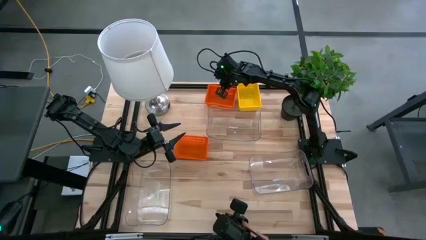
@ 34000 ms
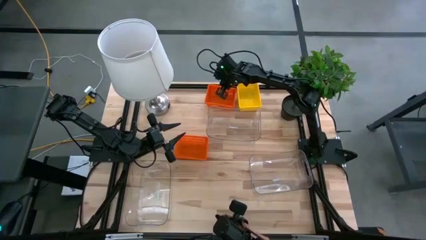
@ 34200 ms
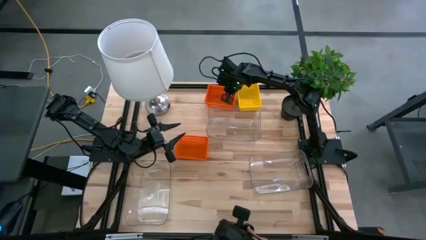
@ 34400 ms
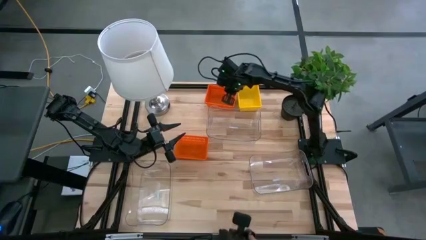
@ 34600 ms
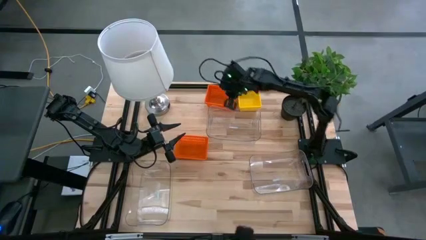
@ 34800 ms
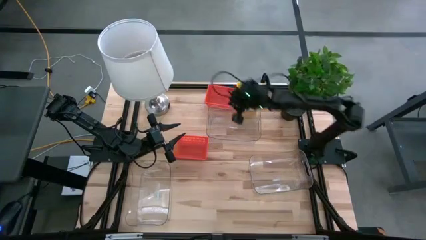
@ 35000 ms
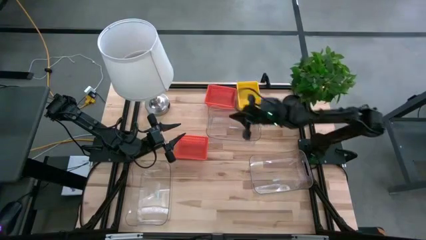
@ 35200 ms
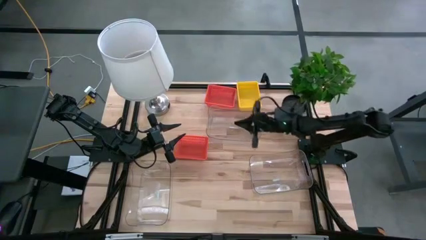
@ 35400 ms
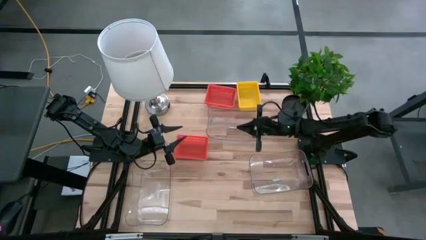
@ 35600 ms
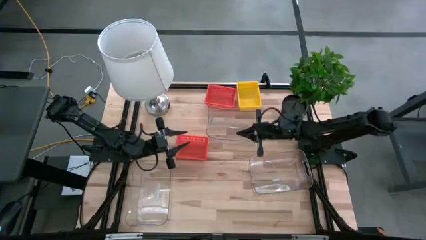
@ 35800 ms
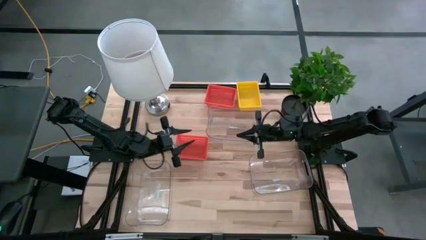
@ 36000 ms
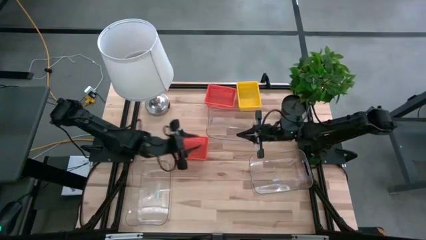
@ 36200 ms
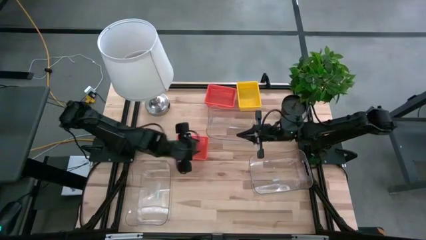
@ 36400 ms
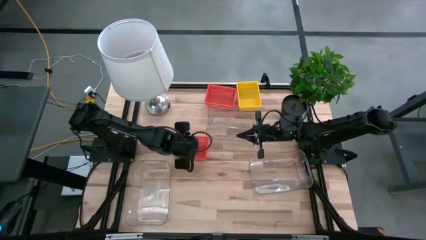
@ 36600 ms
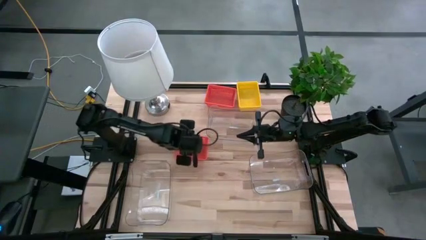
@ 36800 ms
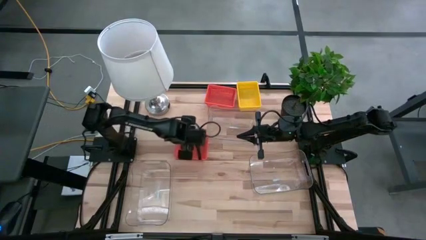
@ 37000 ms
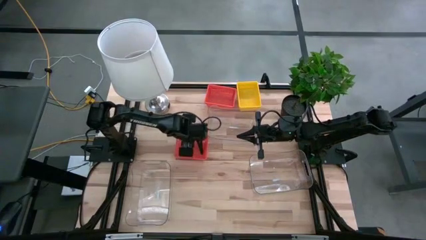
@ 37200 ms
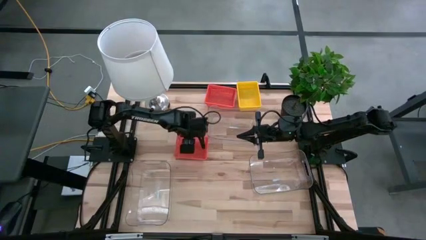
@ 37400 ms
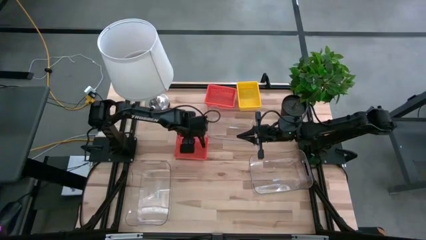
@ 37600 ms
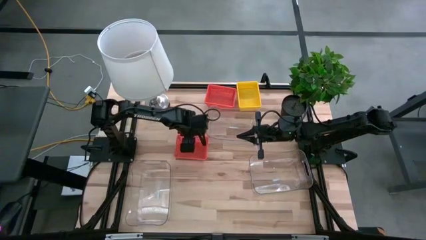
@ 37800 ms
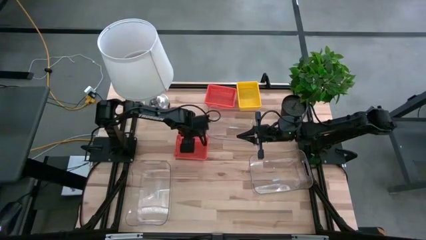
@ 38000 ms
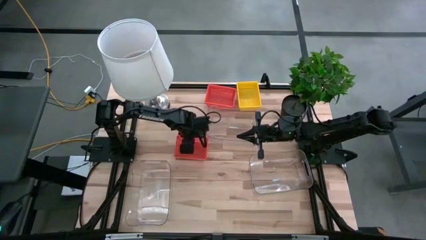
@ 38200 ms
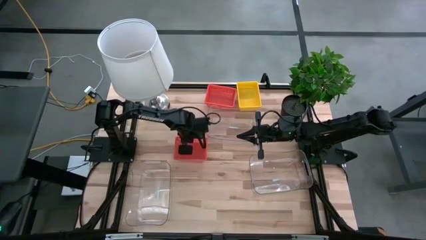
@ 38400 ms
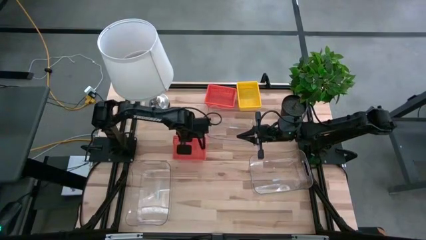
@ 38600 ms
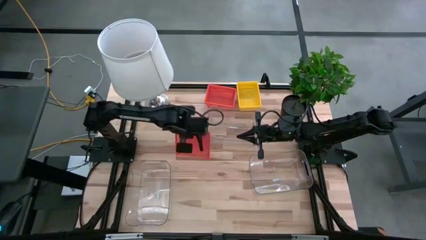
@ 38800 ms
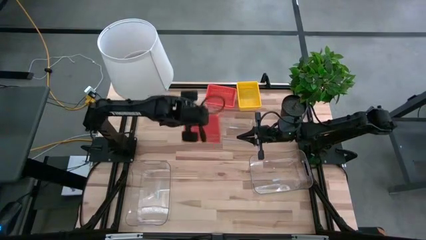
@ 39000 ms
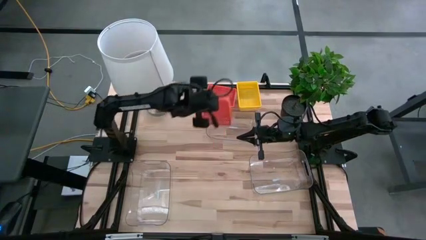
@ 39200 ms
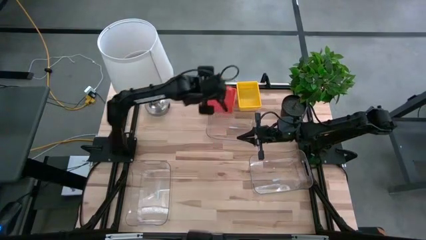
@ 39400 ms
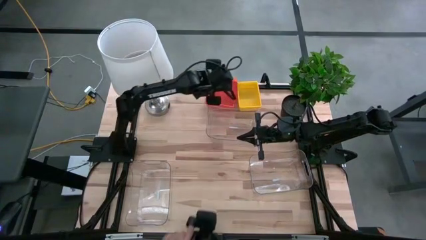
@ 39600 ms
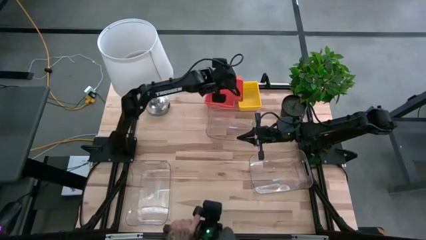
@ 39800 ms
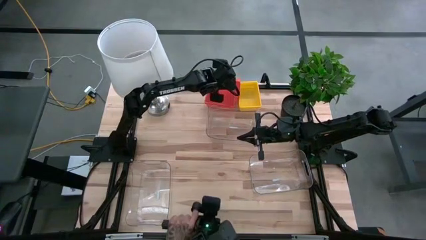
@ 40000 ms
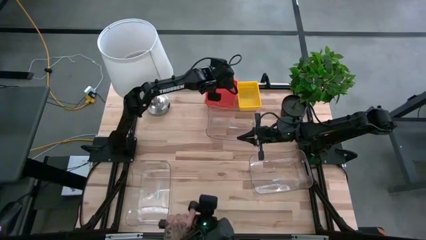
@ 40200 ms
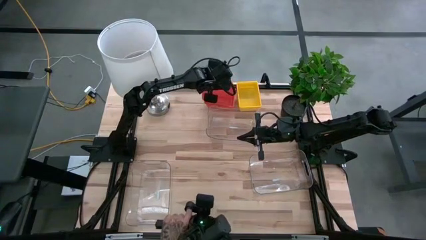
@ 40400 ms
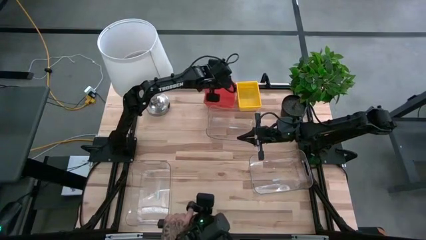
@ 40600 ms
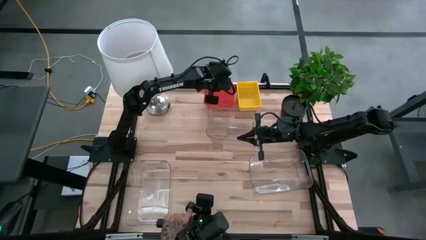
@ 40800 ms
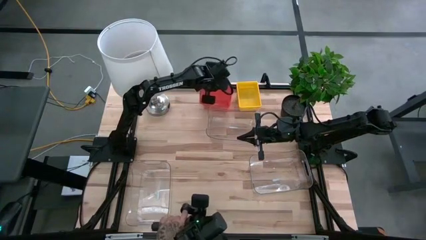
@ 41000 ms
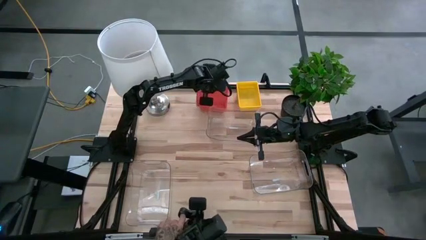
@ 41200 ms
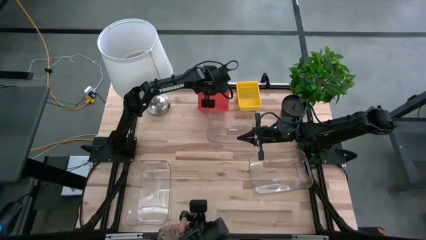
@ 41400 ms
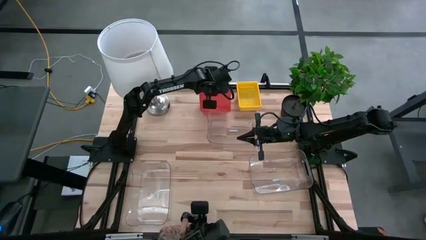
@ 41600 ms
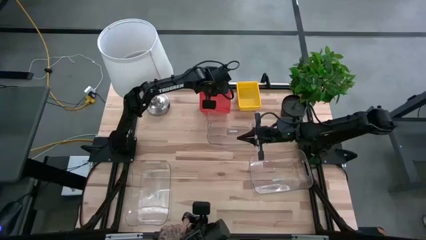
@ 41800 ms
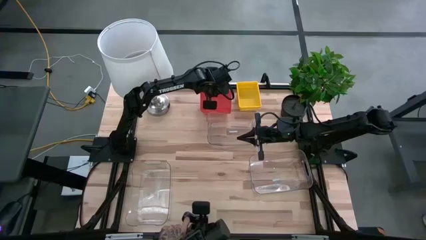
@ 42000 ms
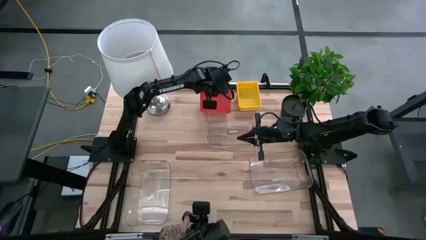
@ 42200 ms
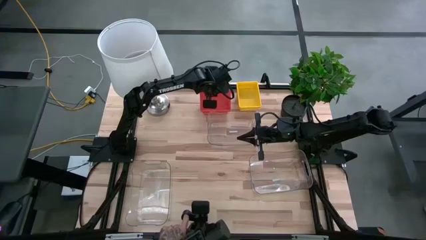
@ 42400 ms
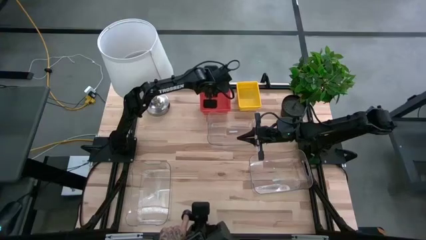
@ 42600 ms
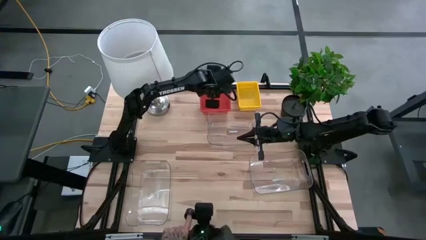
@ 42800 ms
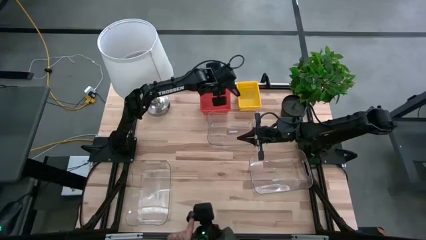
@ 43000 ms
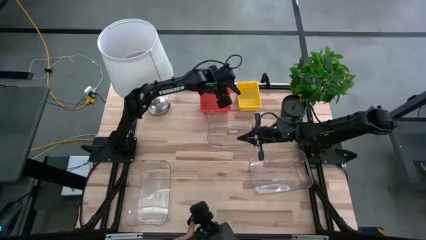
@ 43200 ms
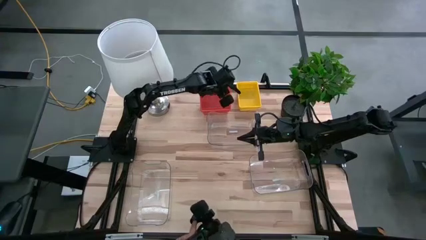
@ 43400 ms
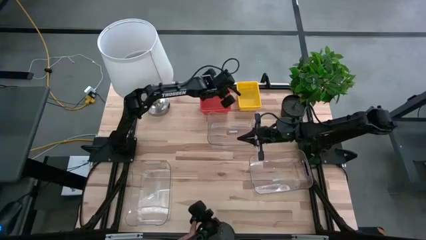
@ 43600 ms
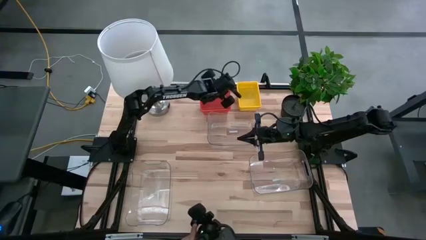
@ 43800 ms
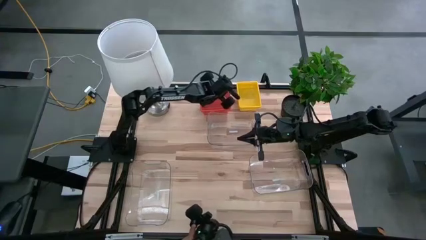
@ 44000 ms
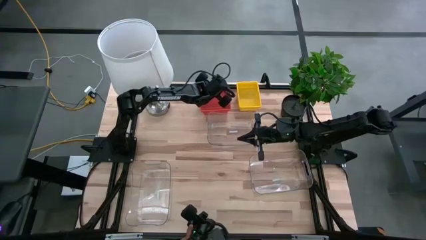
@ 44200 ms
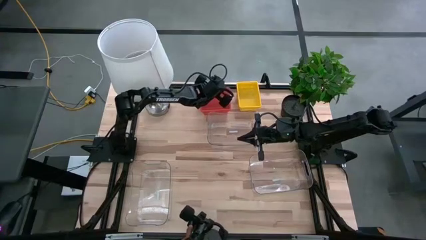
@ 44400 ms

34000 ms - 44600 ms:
Stack the bottom orange bin on the top orange bins

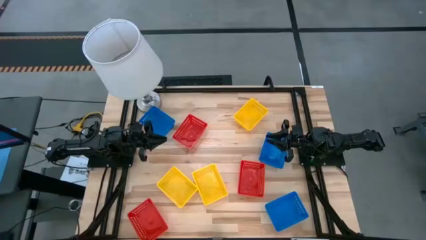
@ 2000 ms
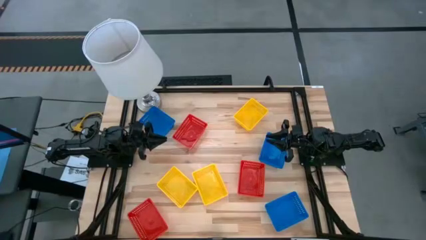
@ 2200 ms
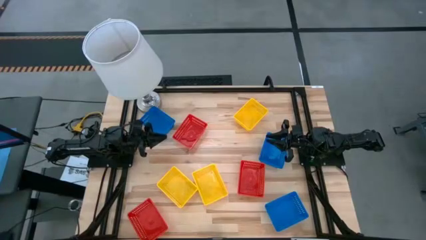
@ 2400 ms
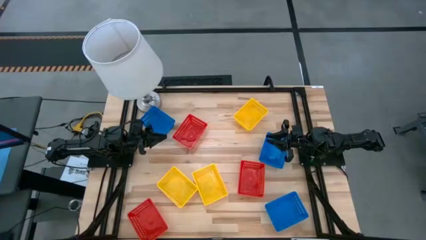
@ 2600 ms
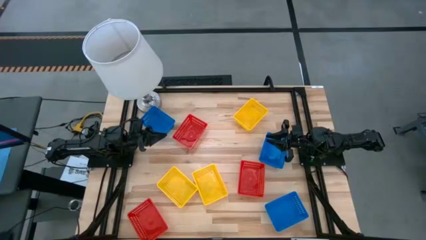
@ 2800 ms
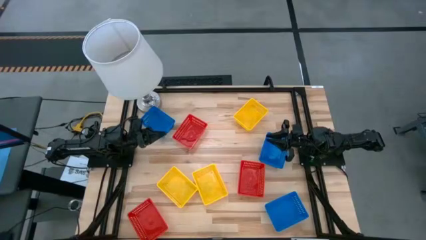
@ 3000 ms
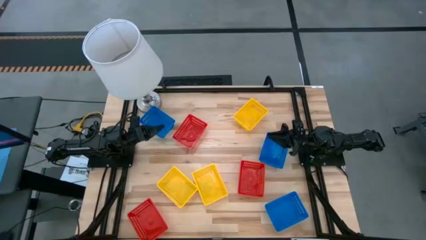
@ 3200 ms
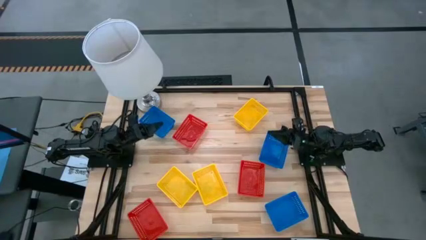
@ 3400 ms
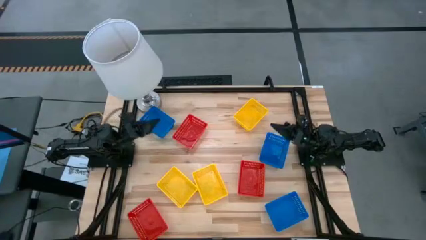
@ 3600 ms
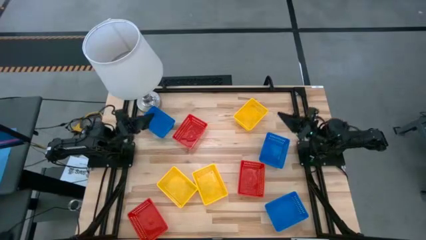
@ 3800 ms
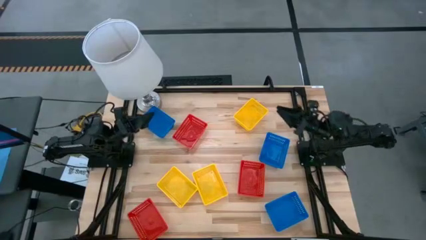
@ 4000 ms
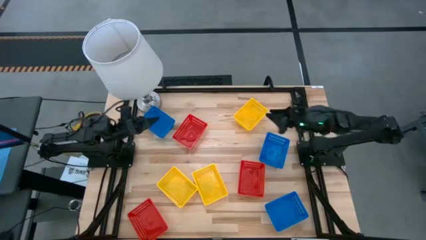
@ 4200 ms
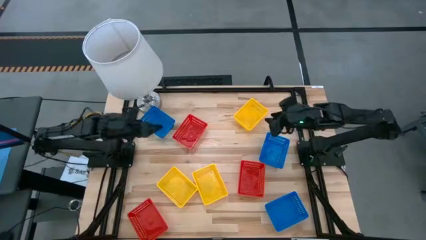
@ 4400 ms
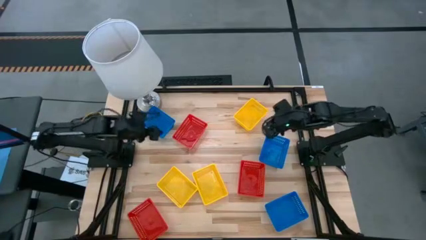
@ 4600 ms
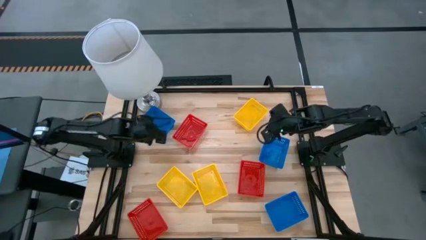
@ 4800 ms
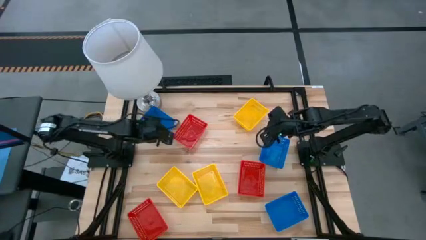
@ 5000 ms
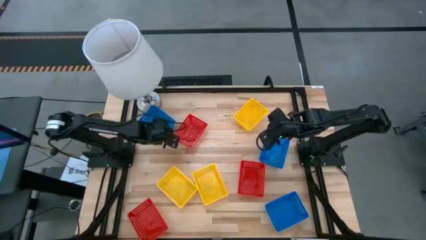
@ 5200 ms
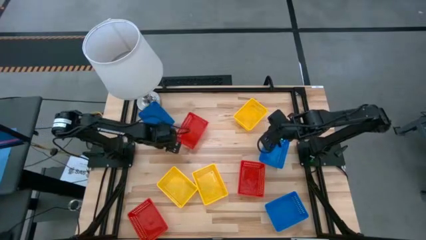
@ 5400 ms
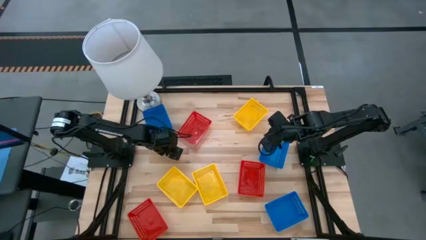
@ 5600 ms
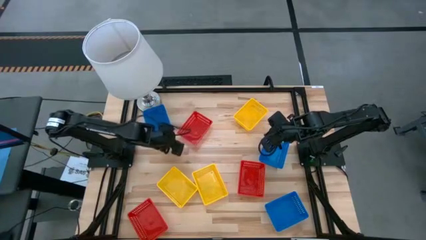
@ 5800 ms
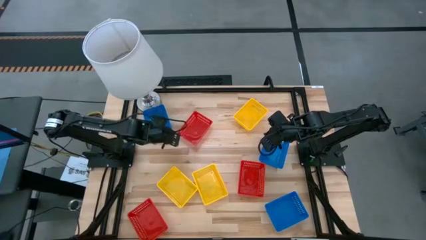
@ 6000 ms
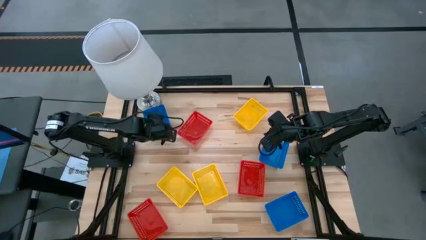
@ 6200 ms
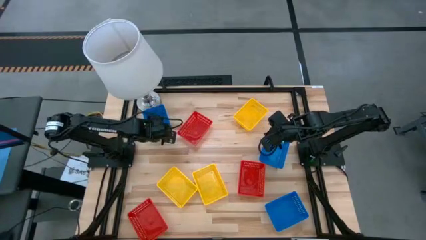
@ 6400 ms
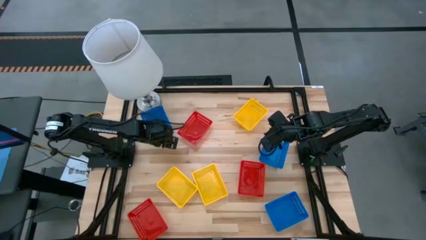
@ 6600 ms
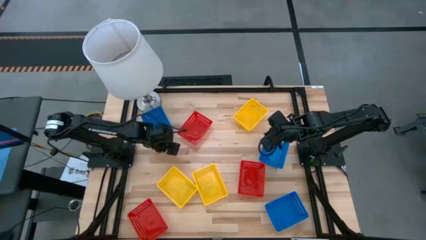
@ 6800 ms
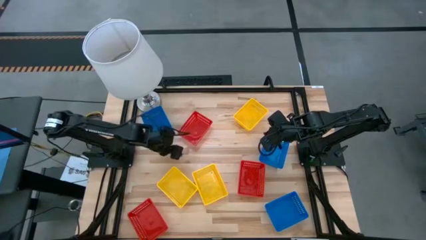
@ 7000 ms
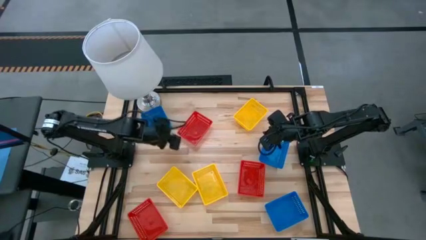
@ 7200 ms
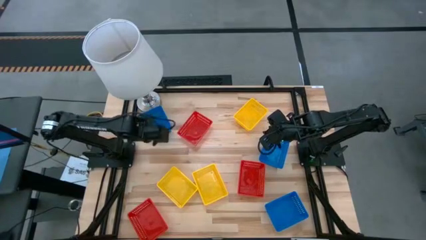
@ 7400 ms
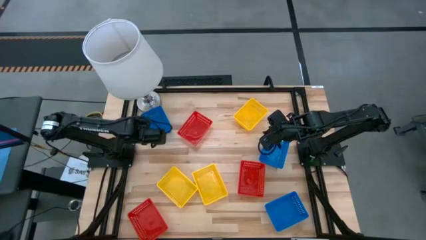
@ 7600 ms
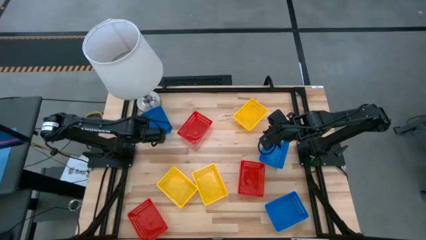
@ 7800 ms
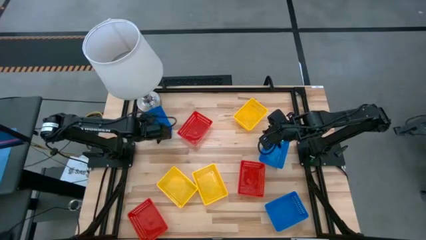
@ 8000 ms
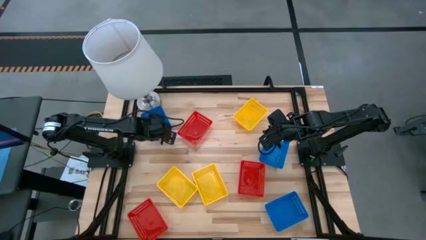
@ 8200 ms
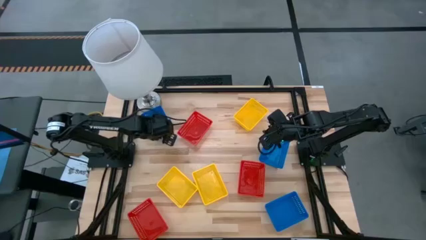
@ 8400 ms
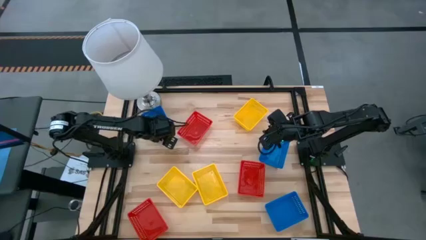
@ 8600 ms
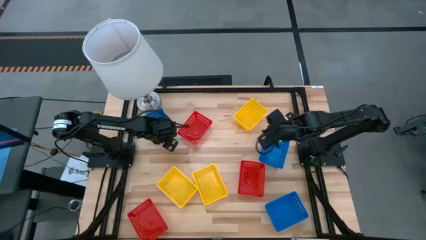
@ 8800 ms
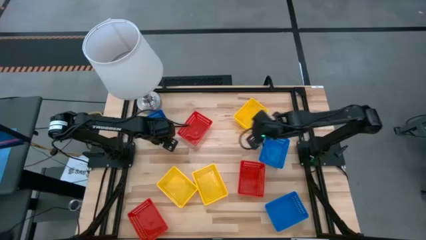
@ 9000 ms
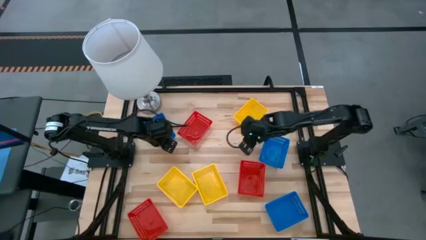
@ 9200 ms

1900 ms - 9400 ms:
Adjust the top left blue bin

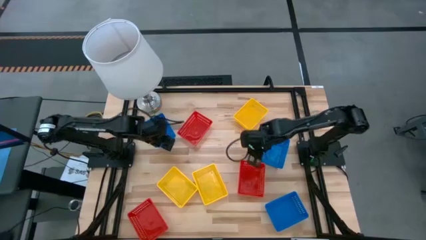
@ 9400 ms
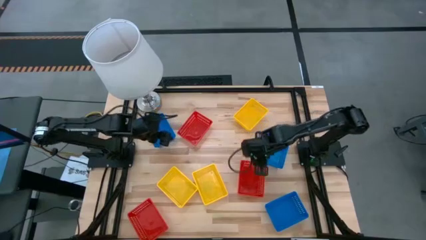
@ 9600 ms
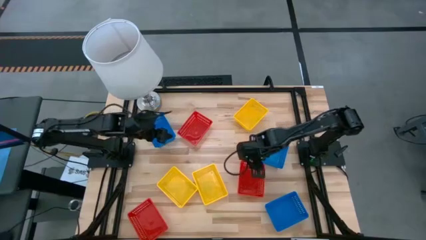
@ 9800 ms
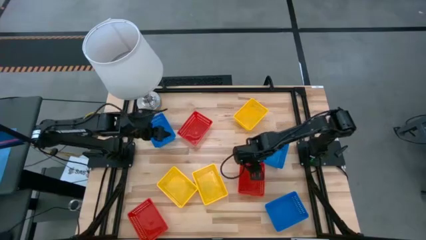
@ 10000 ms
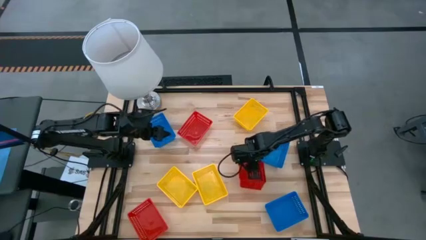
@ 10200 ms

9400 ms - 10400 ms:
Stack the middle right red bin on the top red bin
